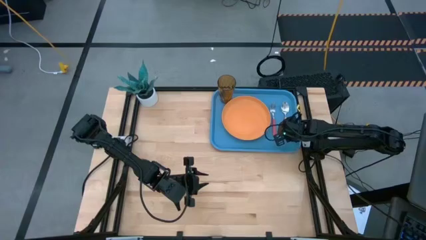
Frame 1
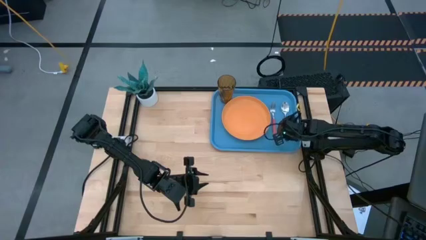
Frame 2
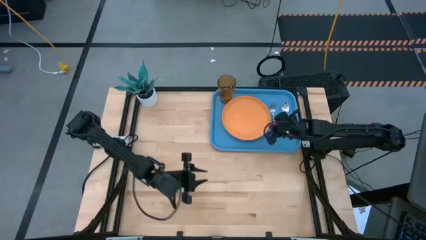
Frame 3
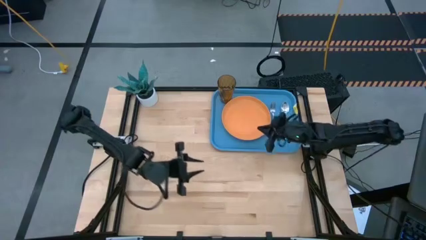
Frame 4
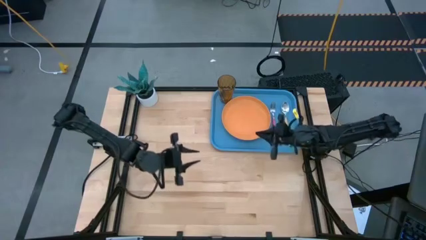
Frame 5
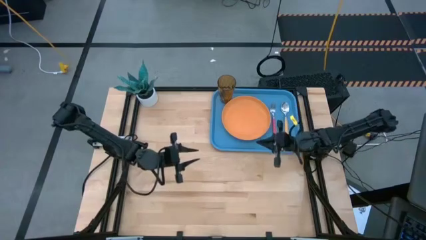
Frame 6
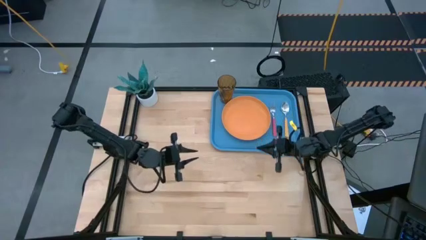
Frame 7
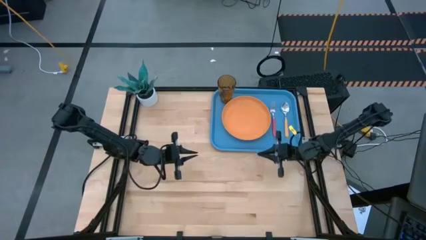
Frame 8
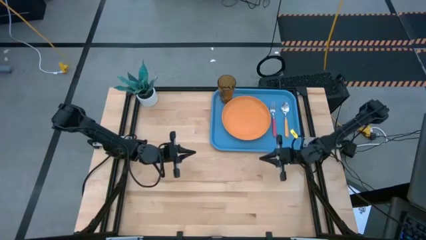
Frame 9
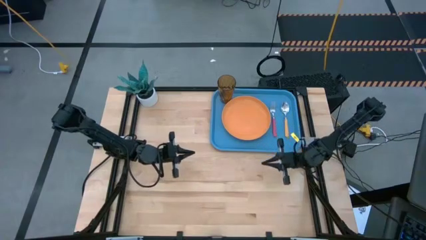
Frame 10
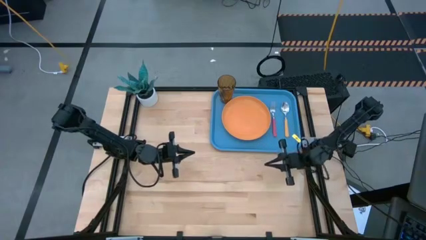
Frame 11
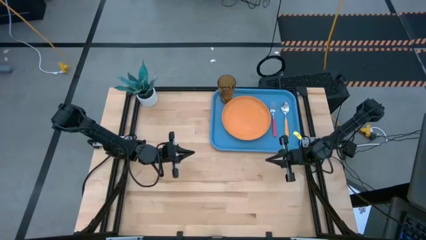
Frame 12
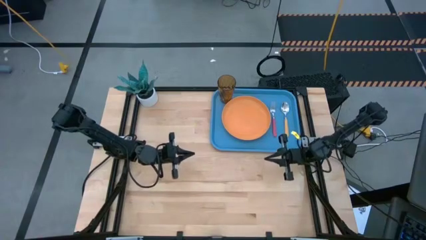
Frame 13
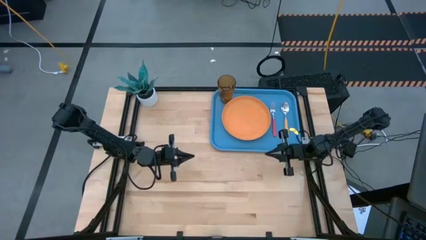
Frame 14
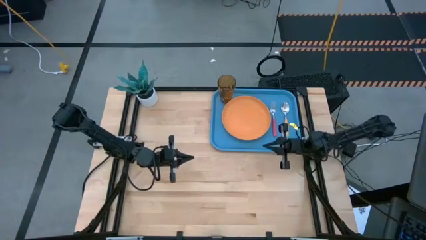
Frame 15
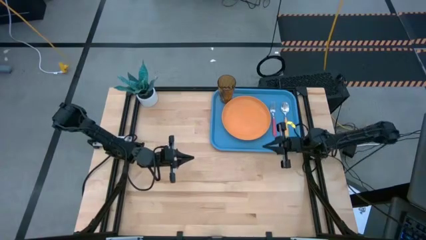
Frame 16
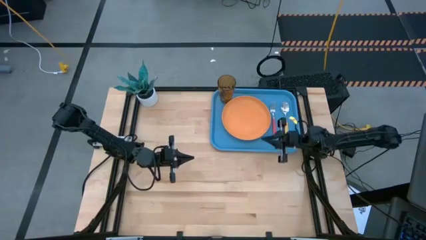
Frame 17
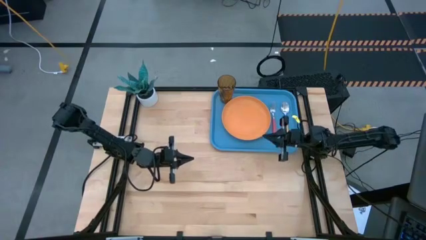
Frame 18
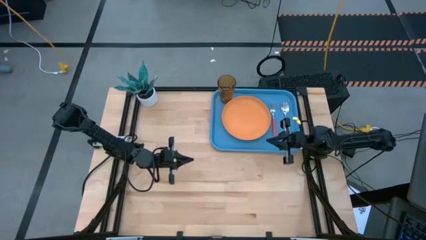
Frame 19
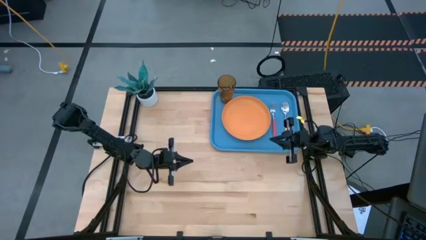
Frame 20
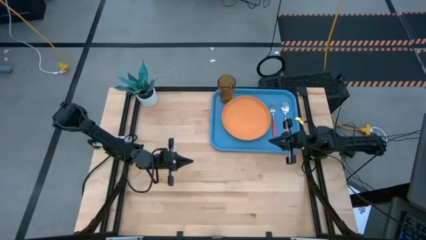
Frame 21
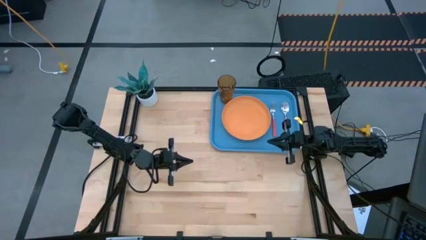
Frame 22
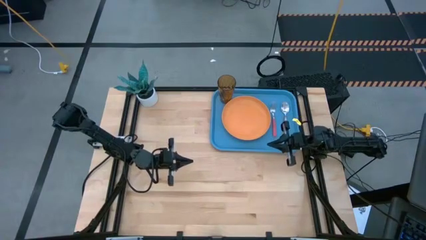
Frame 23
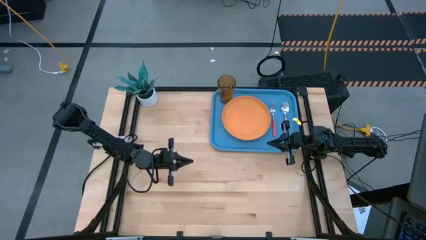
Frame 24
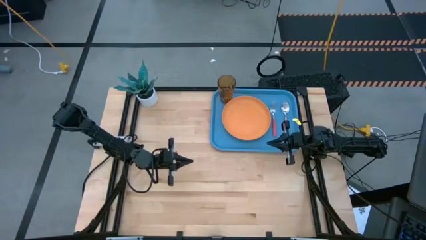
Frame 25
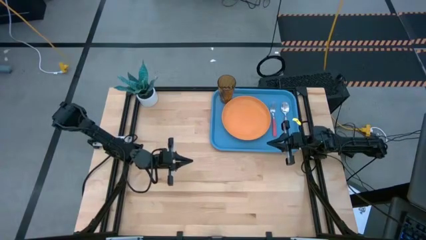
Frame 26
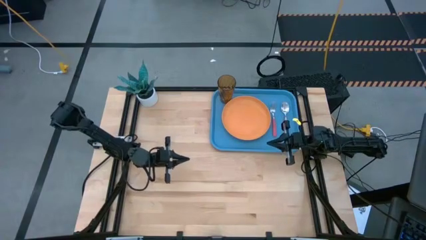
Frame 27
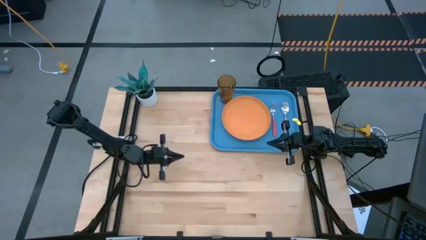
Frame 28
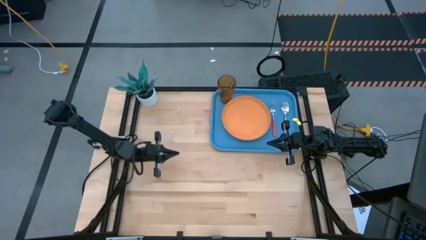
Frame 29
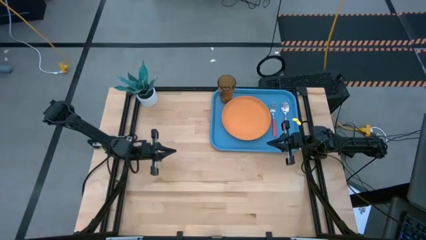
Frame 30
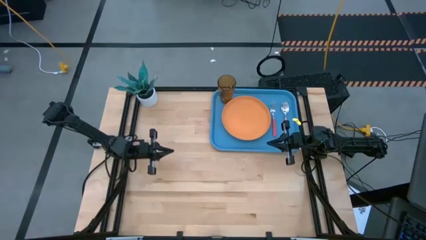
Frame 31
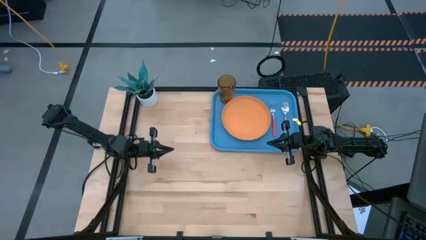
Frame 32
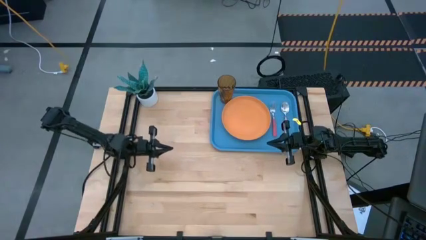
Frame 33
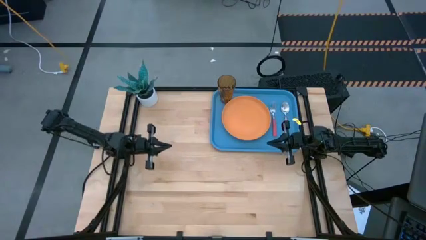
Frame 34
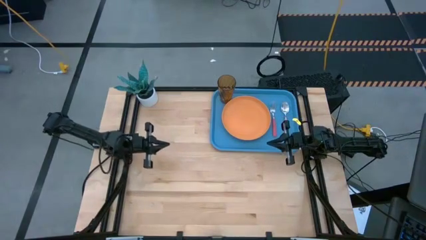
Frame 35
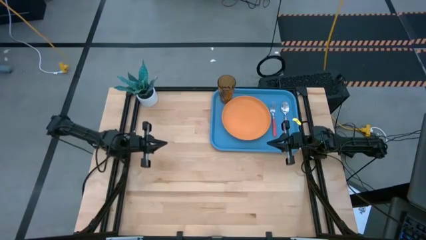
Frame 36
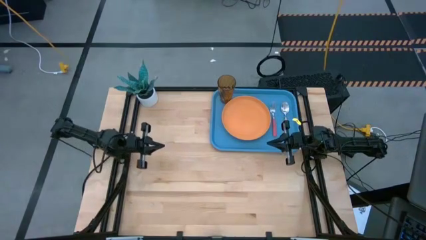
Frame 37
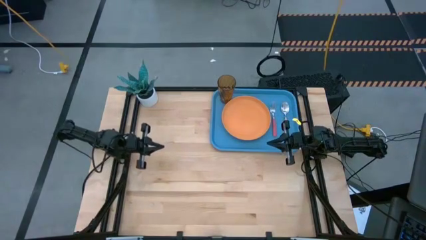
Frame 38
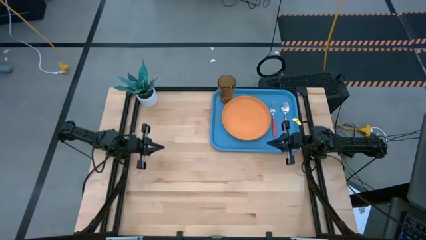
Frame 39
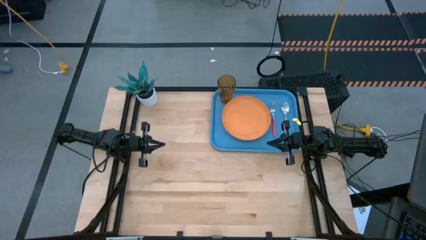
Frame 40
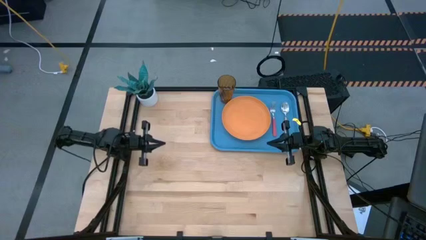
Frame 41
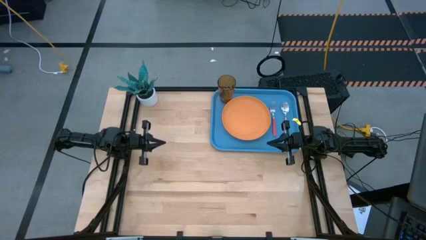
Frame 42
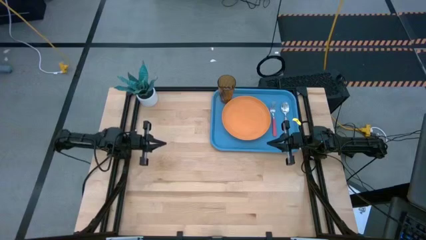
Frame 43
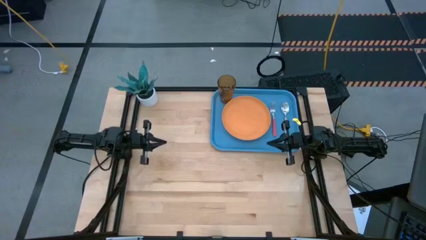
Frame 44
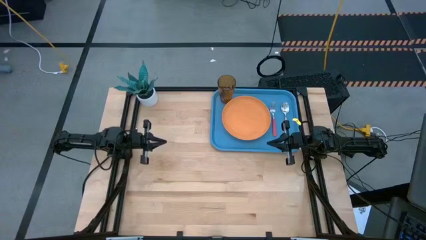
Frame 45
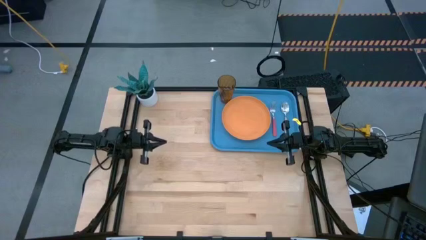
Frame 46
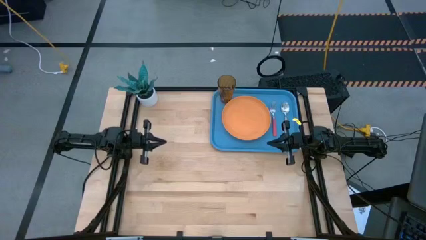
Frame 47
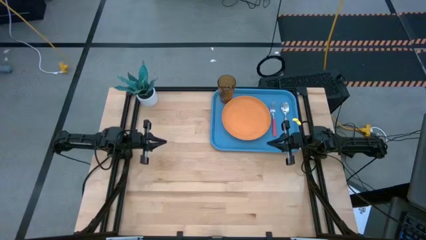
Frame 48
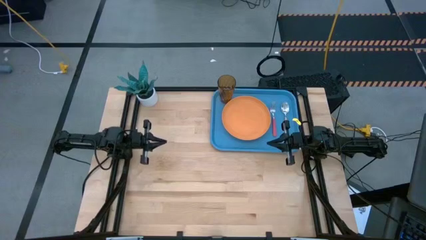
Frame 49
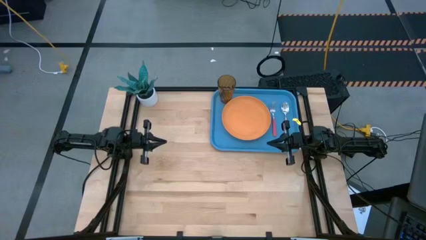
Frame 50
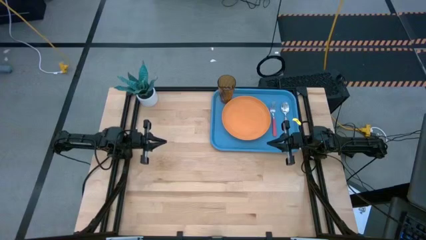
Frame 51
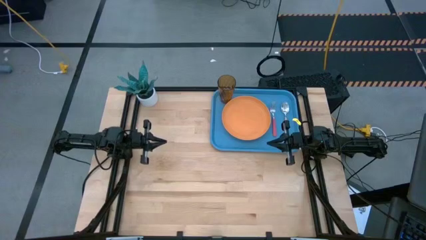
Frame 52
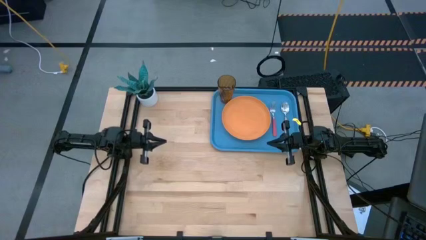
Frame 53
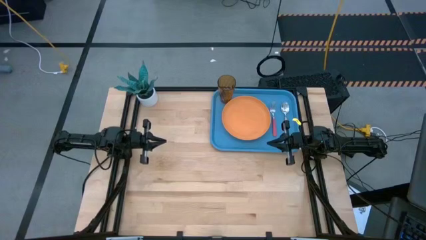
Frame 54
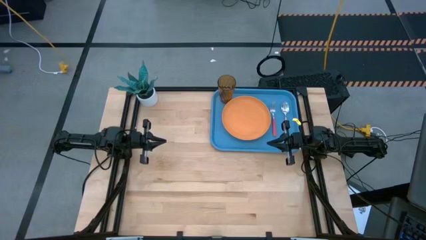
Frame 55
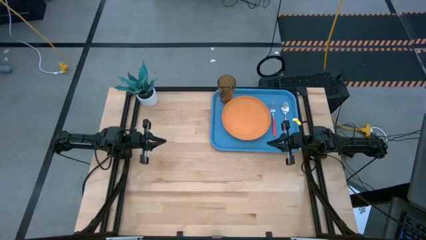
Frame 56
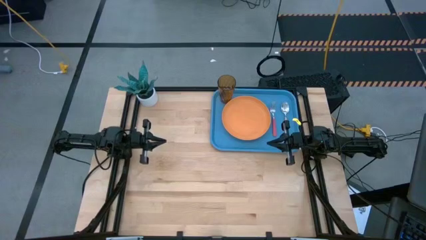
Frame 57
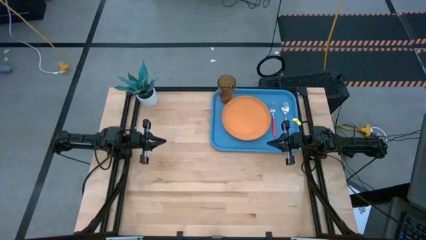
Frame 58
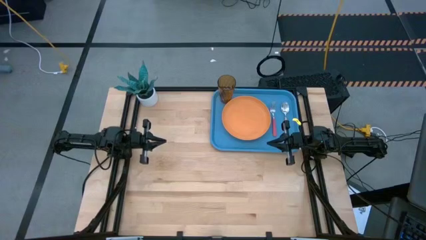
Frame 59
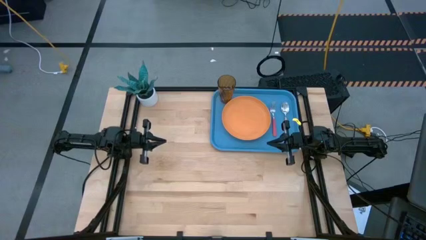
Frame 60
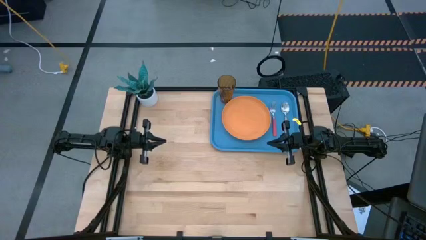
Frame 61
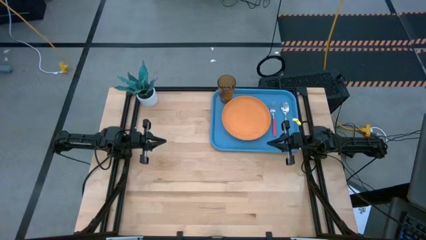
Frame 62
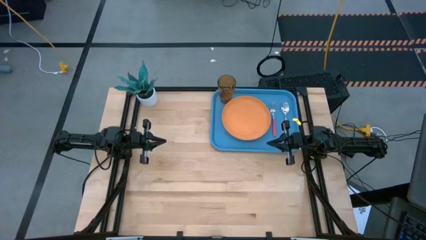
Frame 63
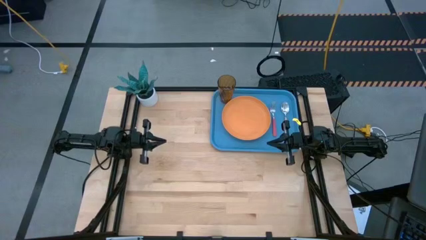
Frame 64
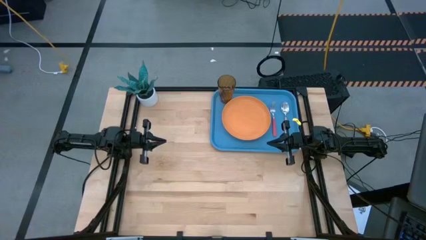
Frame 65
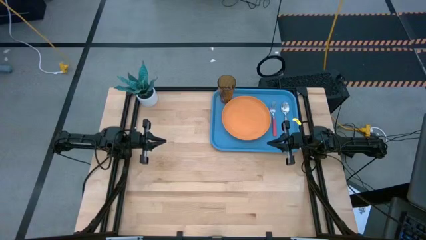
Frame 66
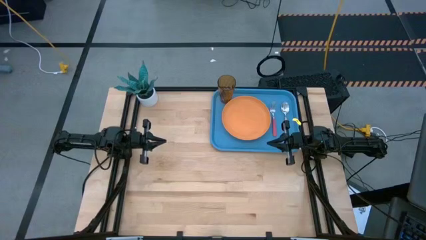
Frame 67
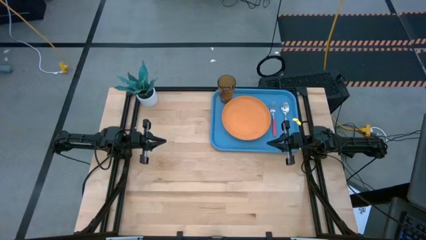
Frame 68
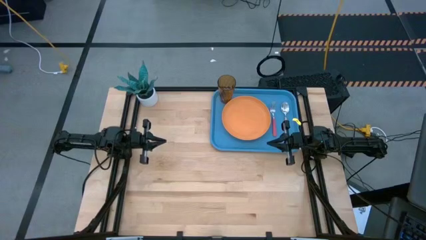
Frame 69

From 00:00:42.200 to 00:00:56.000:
Task: Pick and place plate/cup/fork/spoon on tray
Return to Home Position

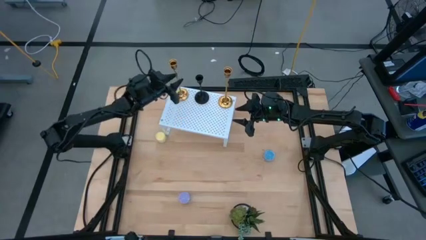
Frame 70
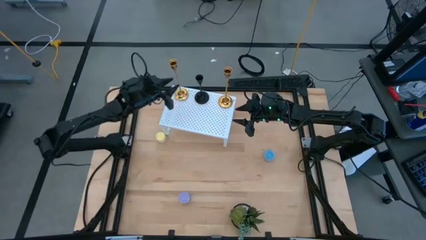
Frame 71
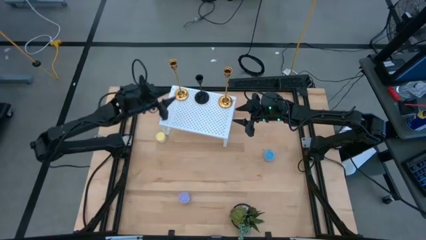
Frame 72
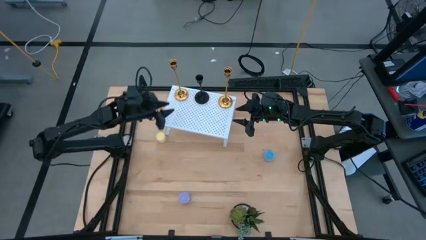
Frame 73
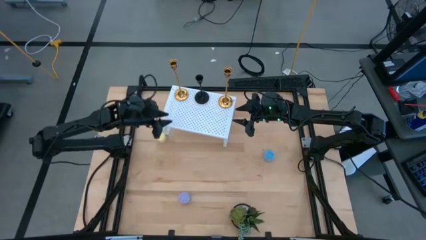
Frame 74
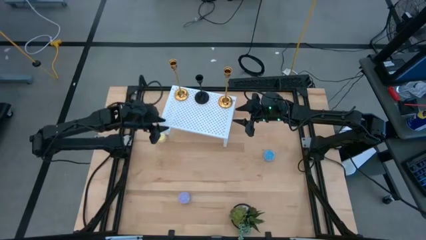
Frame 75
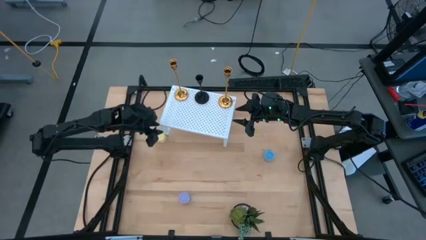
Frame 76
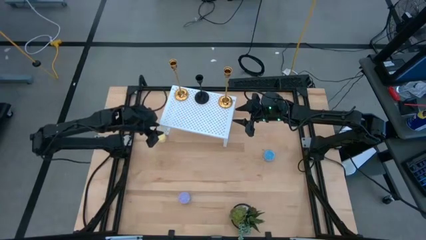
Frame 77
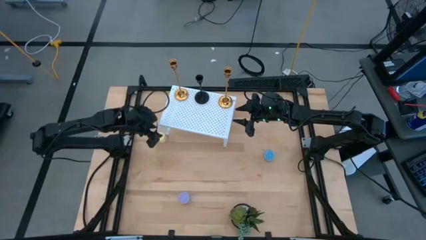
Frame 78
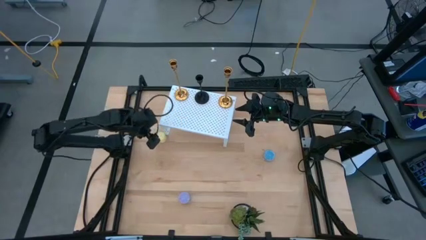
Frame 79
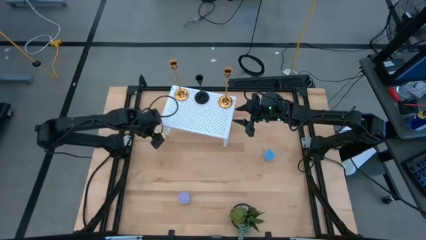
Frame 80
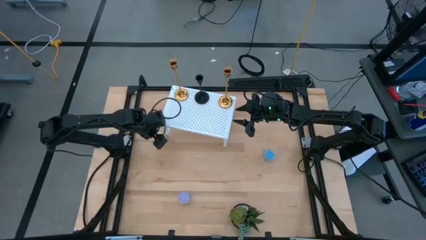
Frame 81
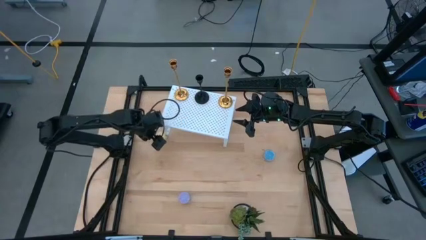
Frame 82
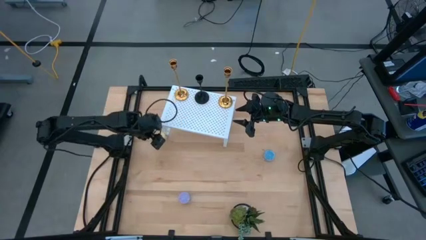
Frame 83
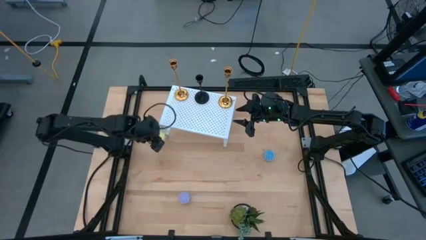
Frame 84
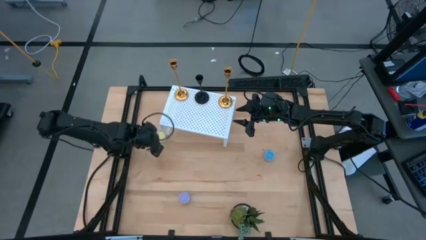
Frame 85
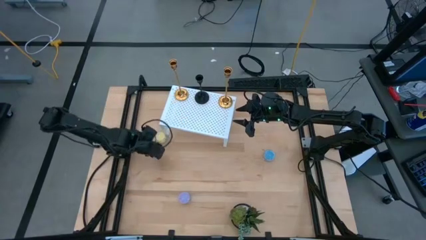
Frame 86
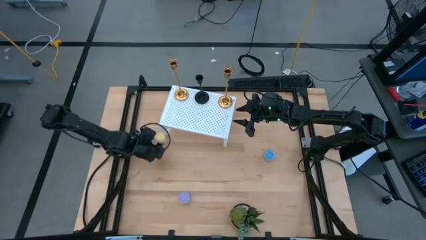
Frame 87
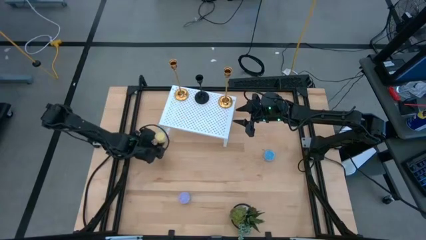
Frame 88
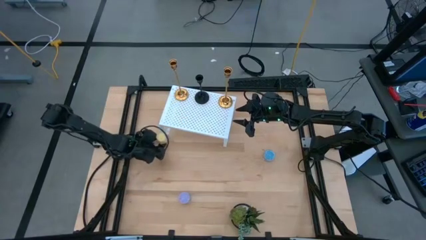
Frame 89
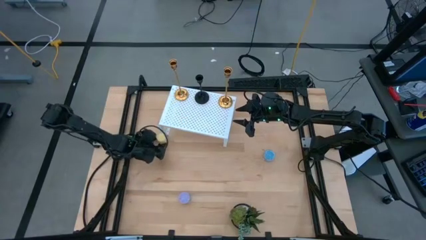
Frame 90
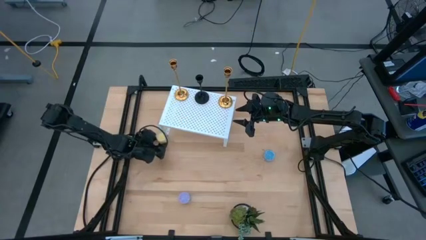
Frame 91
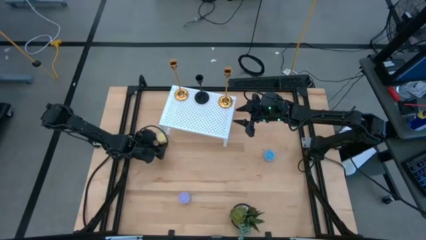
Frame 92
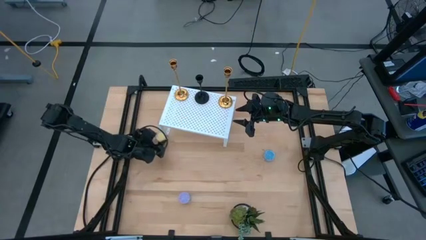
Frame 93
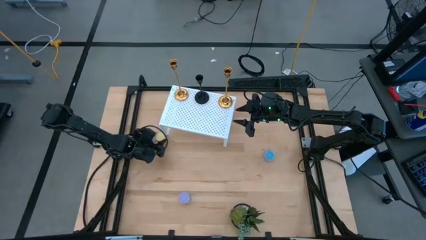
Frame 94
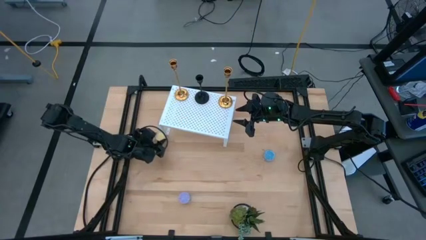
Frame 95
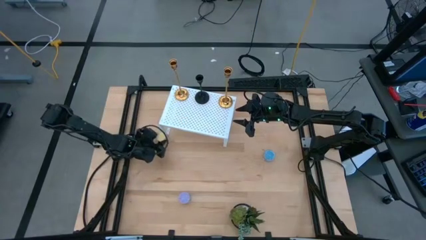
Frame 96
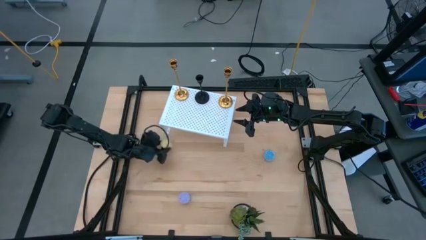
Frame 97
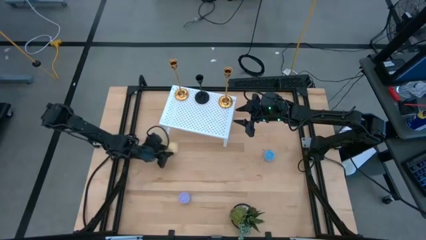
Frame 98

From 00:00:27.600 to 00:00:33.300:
Task: Pick & Place candle stick holders
Put the yellow scented candle on the shelf
